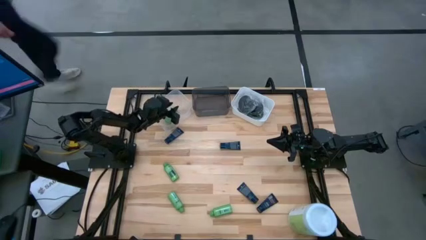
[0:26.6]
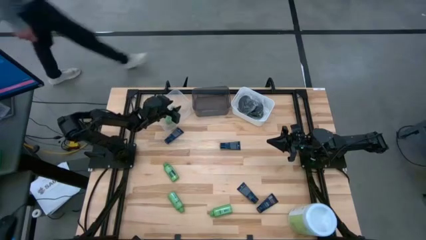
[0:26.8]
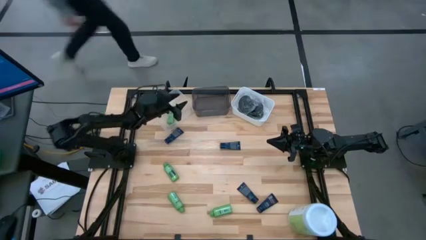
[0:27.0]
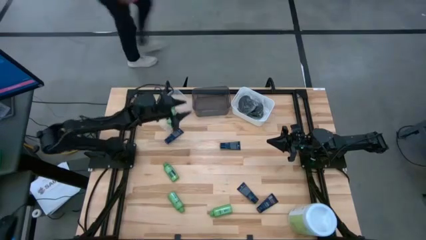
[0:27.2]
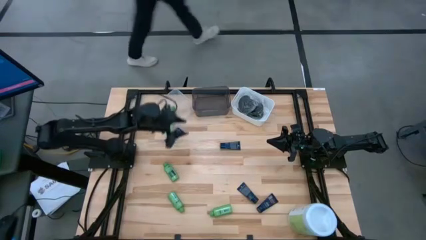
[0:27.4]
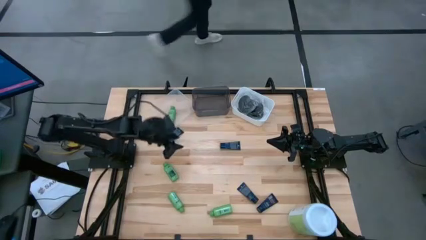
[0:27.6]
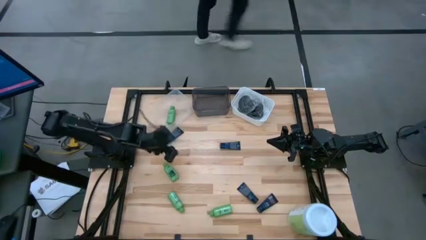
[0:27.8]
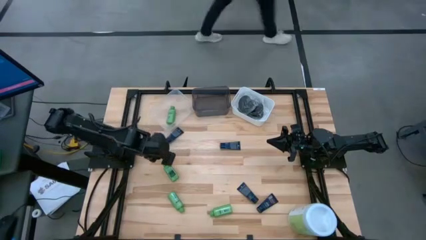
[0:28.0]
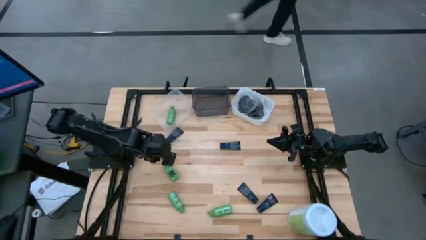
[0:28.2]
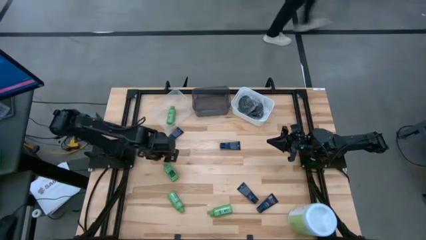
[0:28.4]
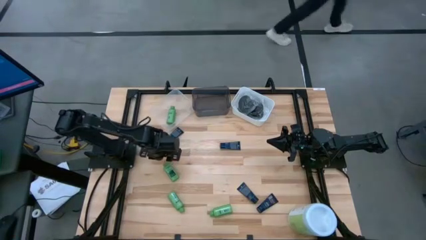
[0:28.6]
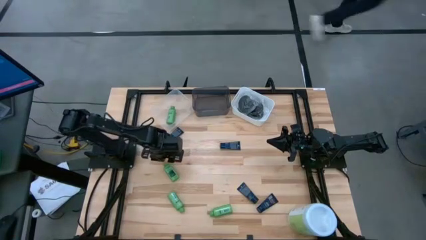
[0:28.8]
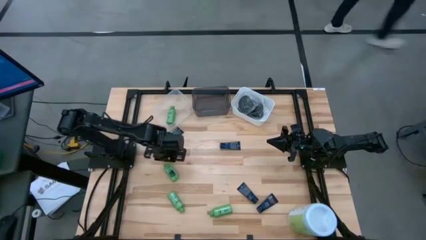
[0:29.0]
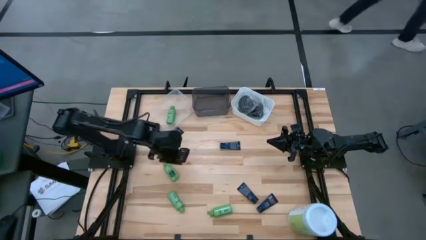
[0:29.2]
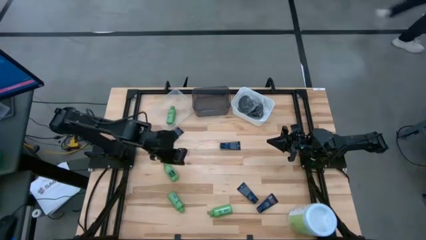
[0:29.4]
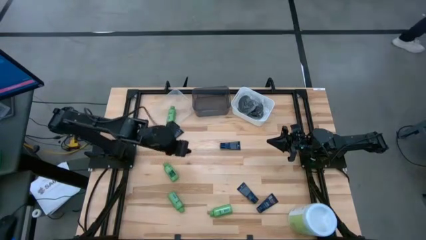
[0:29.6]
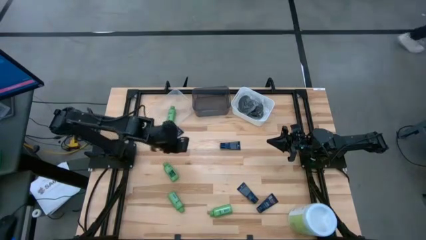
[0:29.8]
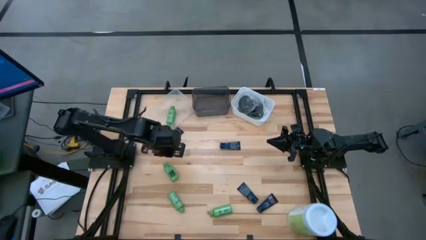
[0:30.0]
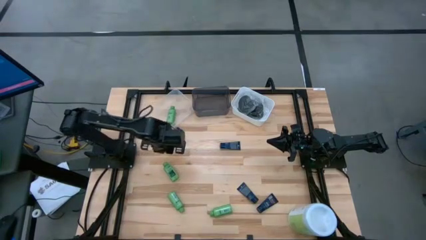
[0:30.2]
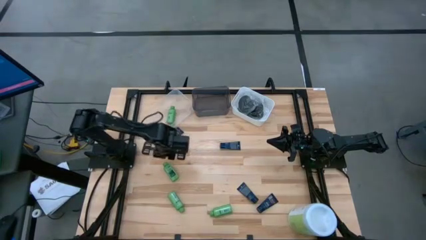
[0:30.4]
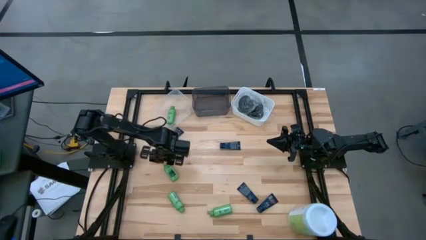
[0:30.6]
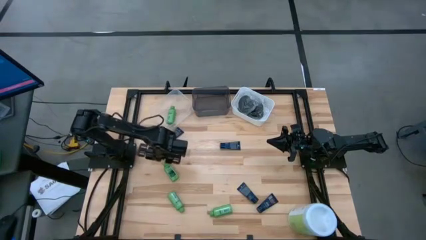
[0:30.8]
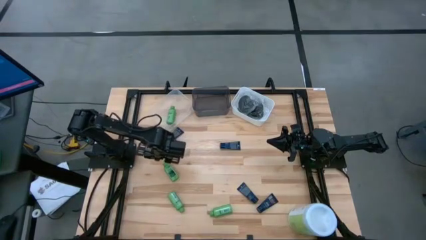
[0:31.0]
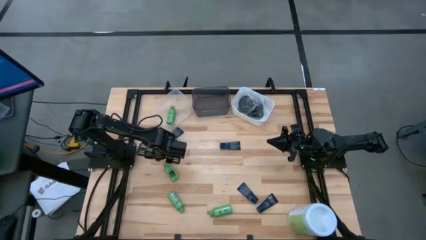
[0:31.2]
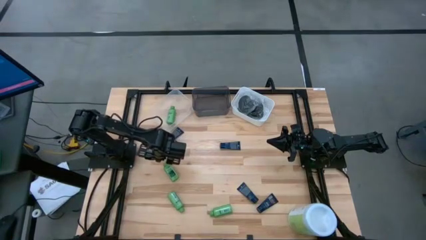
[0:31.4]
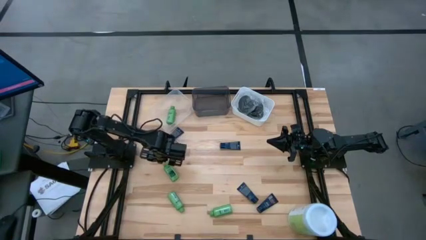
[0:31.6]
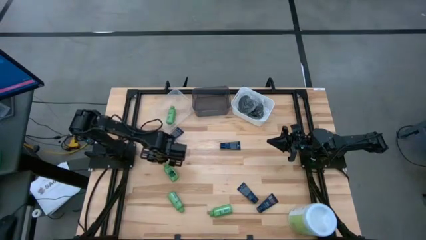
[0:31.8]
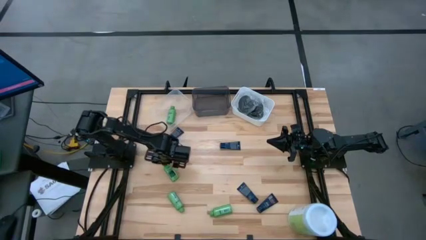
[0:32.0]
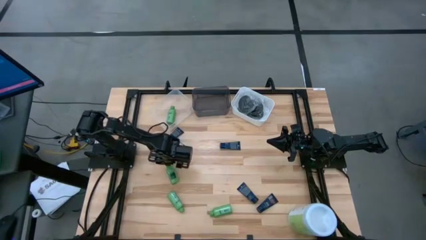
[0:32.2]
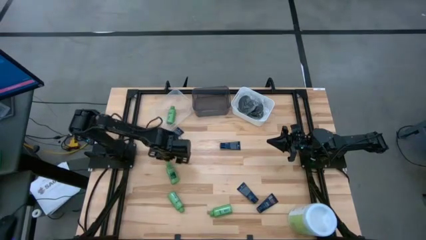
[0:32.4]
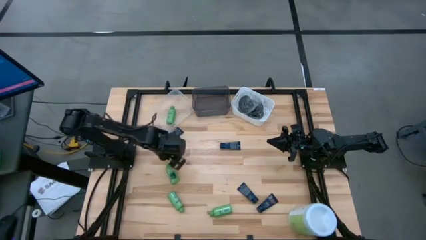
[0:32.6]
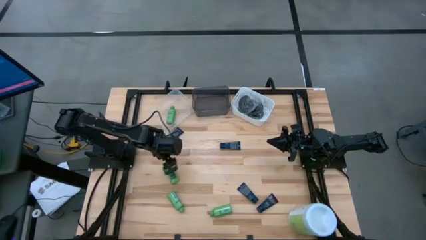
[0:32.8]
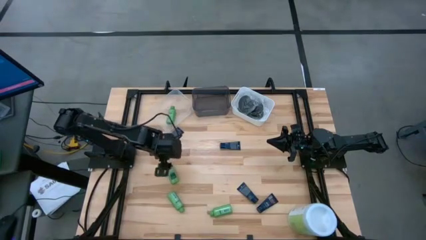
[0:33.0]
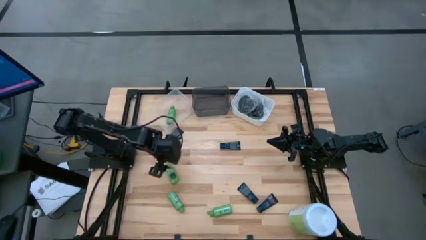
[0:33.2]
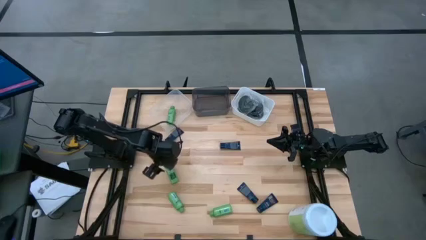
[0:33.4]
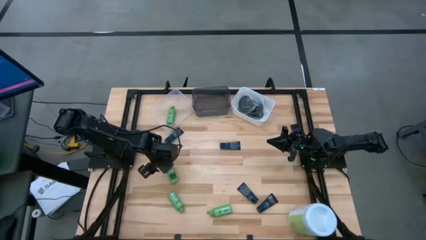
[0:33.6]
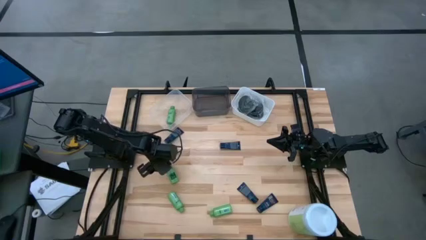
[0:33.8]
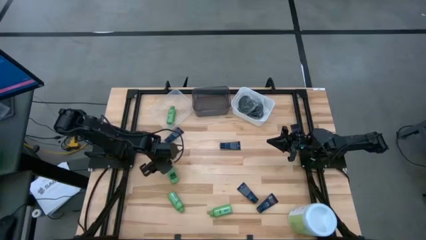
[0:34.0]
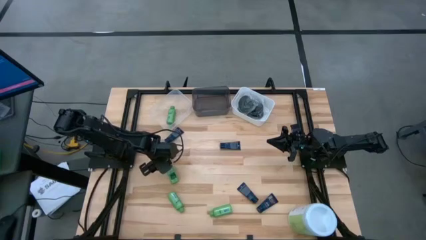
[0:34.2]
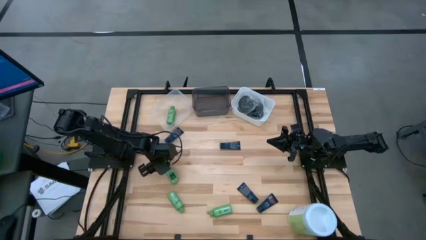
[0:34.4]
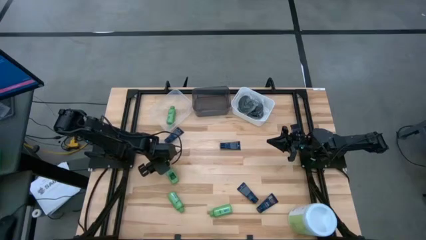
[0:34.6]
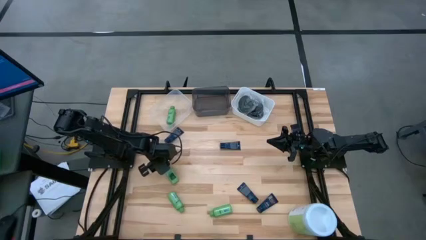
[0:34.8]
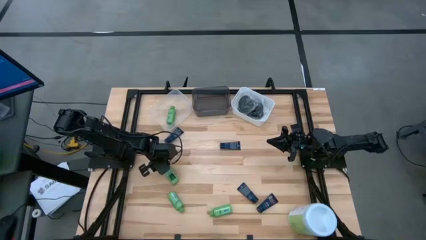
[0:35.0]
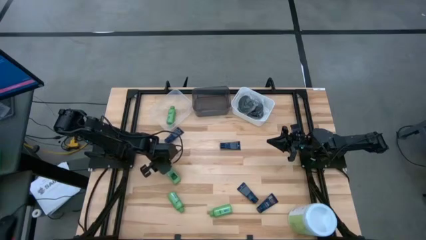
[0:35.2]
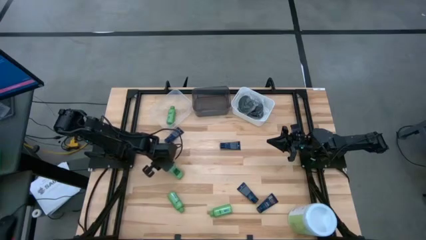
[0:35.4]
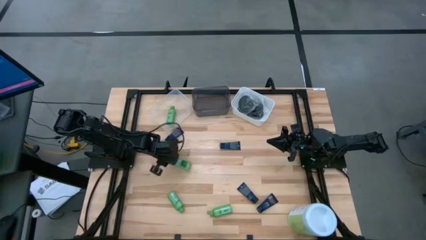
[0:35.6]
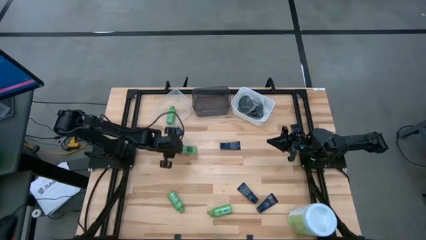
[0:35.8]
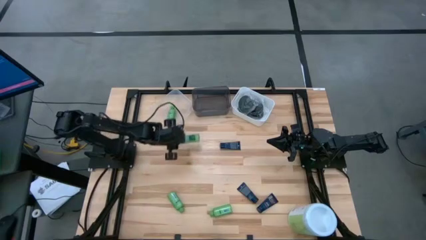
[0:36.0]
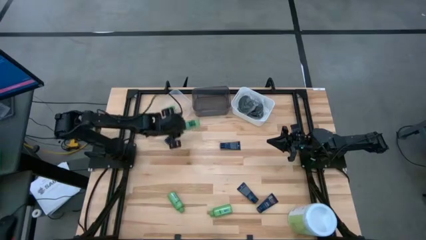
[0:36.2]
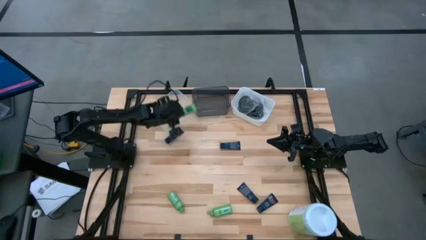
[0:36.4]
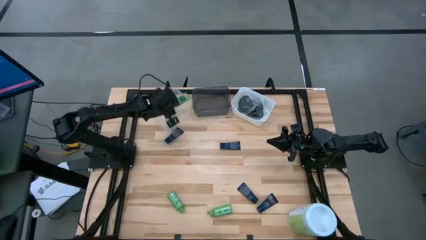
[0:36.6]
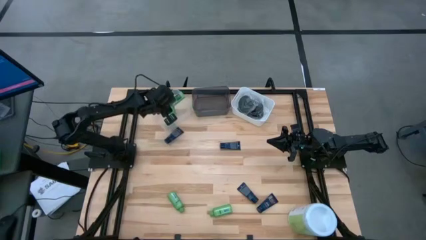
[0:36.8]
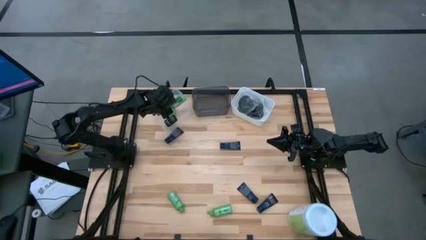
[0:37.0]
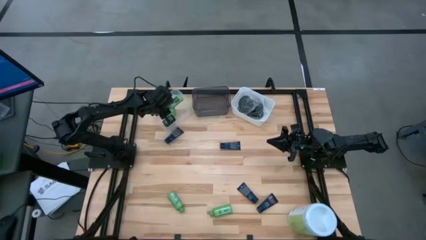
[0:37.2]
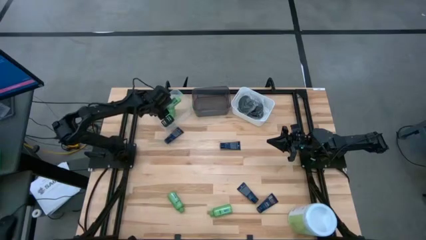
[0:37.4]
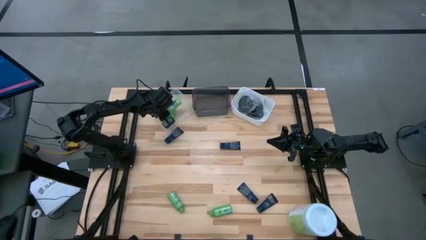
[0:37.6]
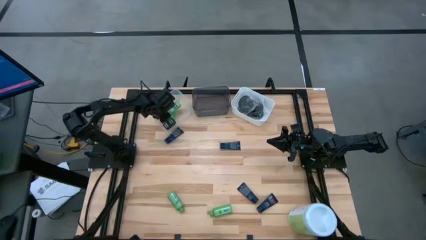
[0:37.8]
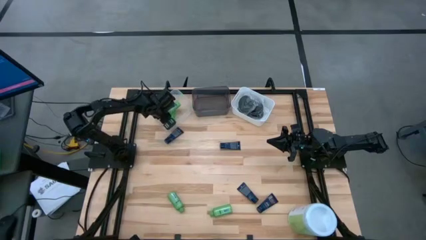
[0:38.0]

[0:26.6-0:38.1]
Task: Pick & Place Travel size toiletries
Put the green shampoo into the transparent bin

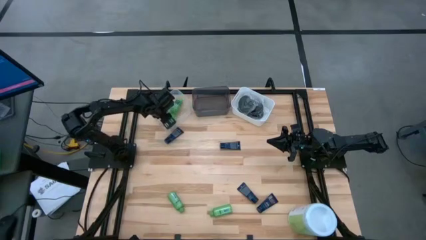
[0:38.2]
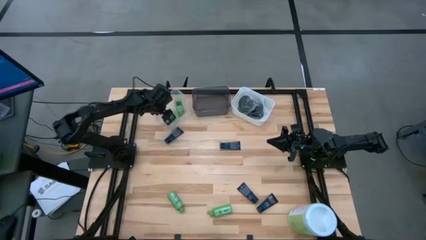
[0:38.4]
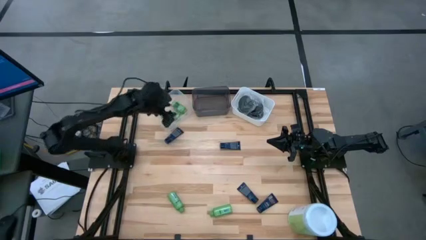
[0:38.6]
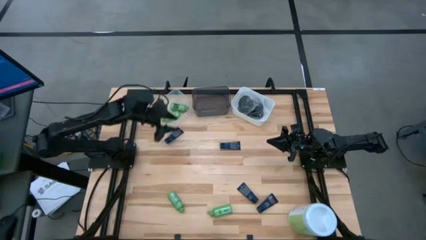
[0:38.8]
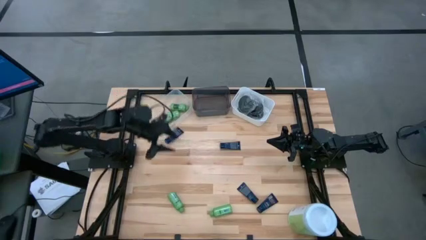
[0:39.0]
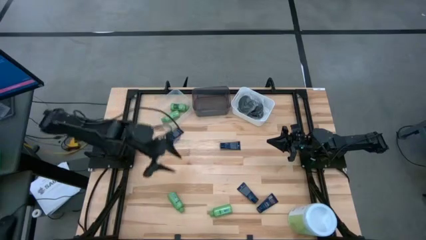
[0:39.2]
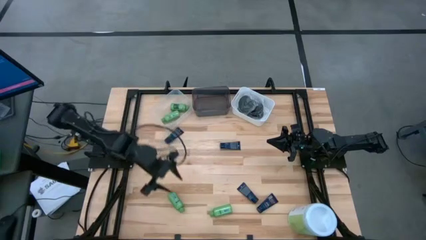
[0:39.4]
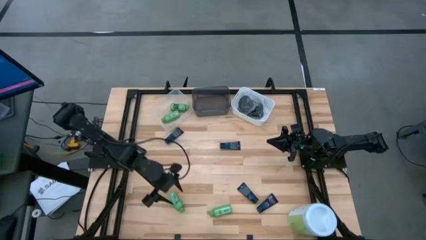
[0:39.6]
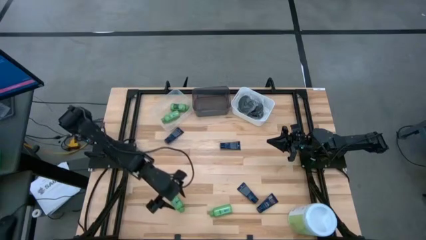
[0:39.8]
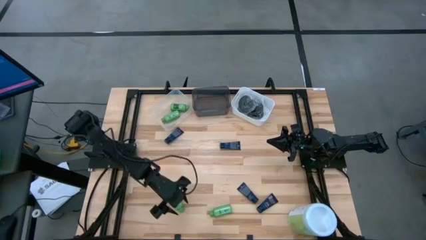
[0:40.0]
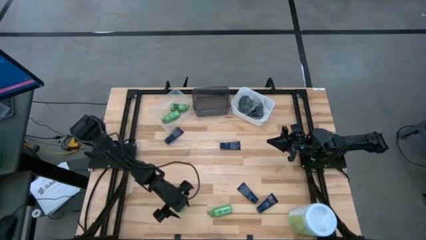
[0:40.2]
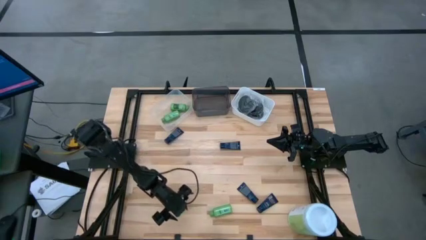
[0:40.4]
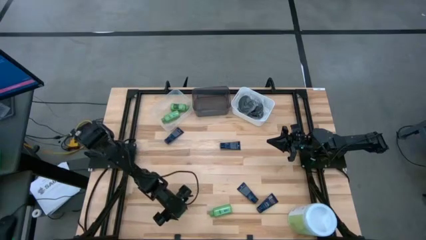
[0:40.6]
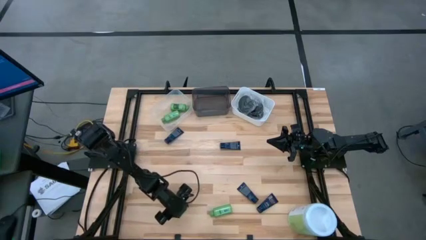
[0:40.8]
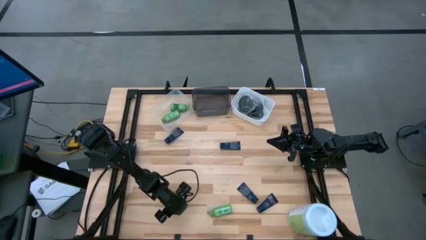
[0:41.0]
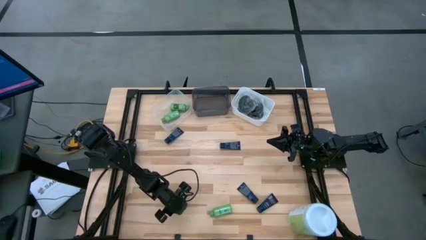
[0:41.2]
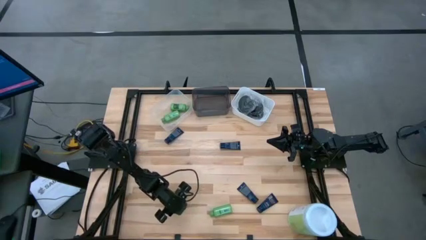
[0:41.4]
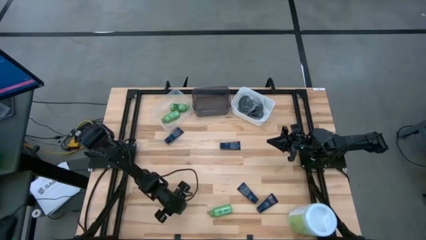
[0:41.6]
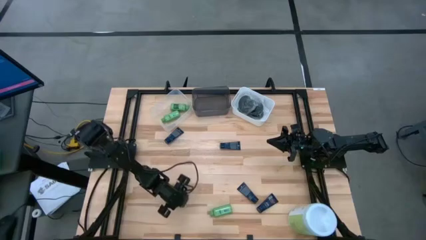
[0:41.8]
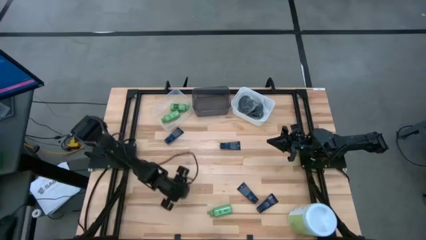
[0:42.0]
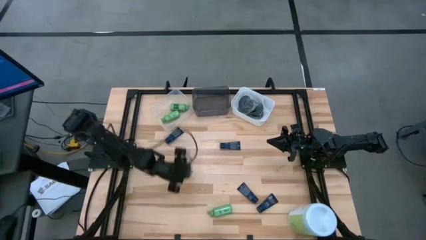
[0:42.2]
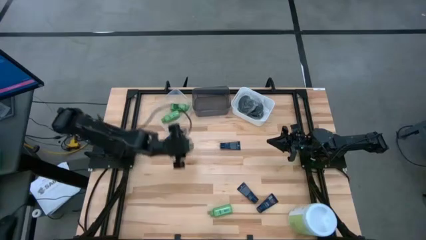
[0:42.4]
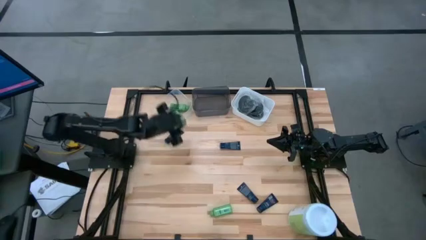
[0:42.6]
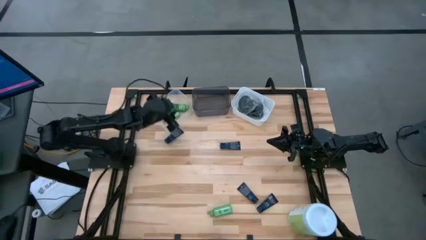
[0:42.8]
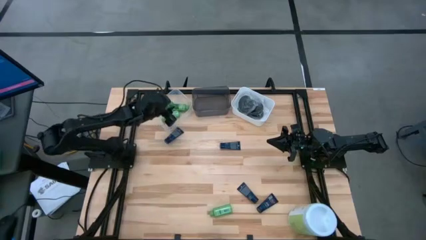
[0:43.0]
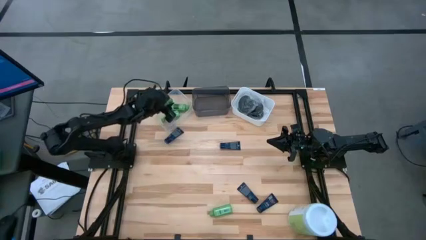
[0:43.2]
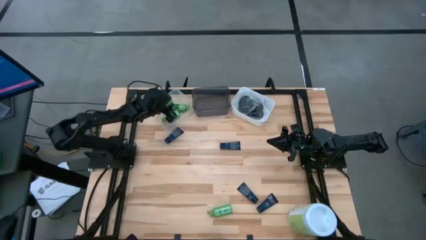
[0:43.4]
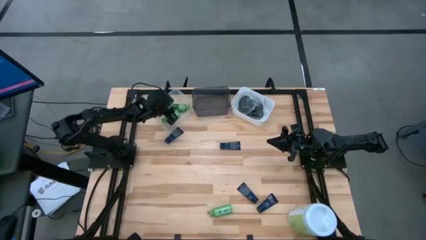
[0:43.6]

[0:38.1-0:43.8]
Put the green shampoo into the transparent bin
